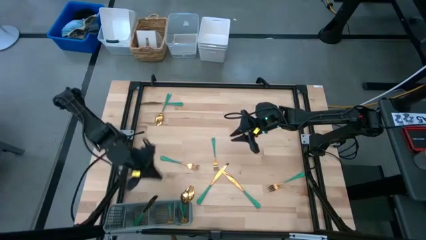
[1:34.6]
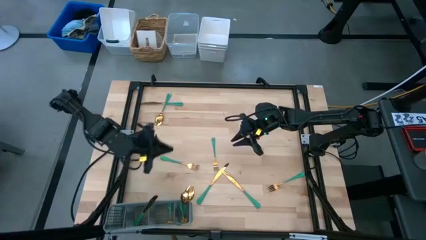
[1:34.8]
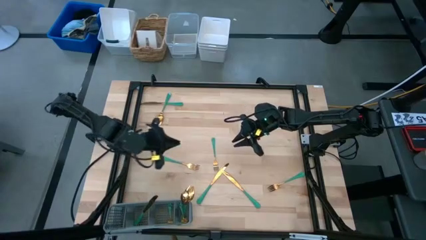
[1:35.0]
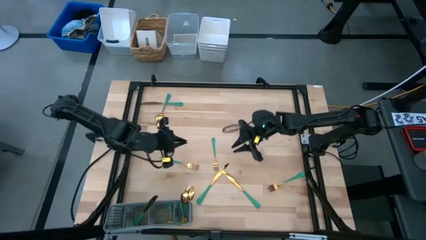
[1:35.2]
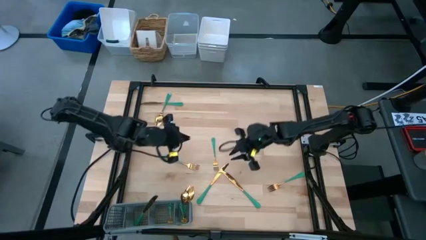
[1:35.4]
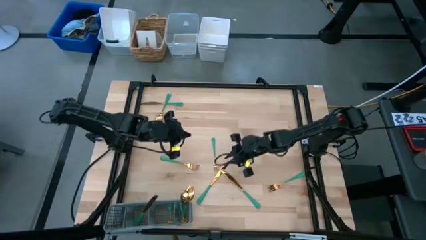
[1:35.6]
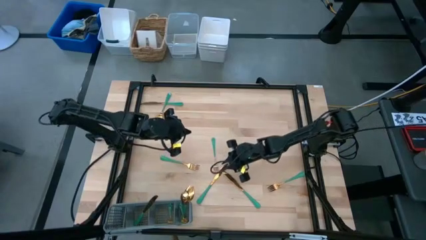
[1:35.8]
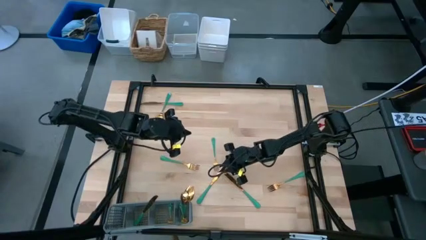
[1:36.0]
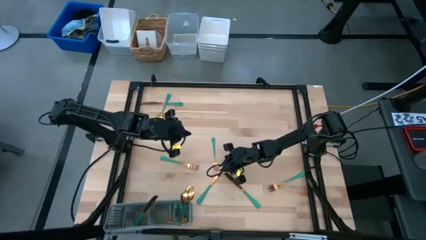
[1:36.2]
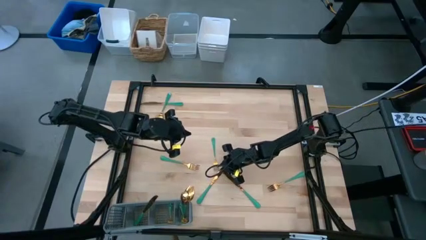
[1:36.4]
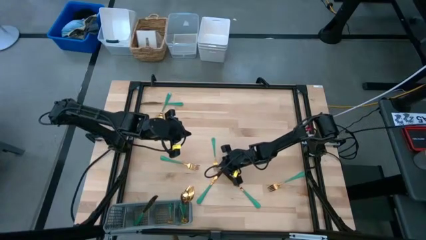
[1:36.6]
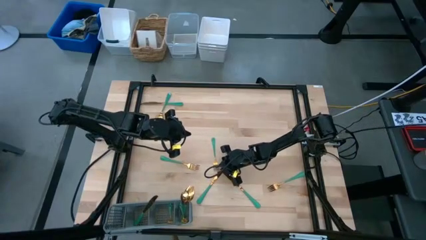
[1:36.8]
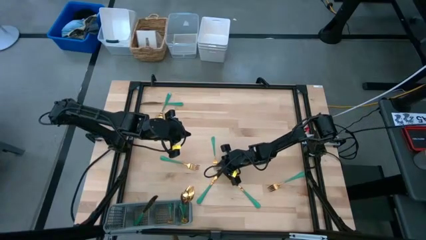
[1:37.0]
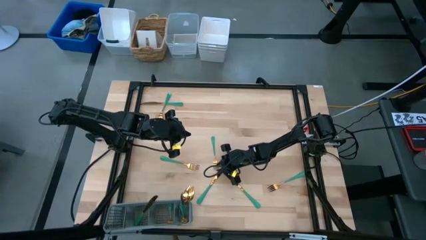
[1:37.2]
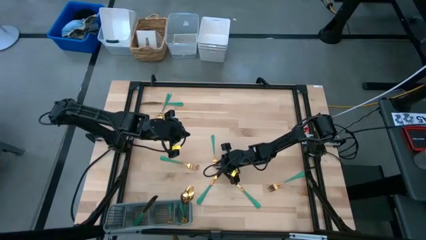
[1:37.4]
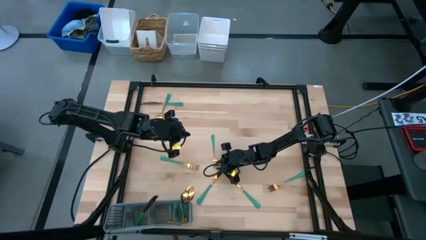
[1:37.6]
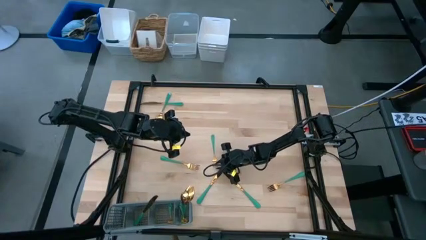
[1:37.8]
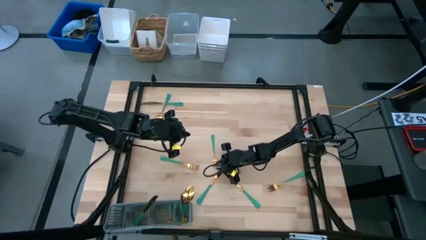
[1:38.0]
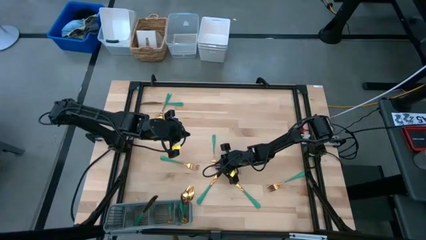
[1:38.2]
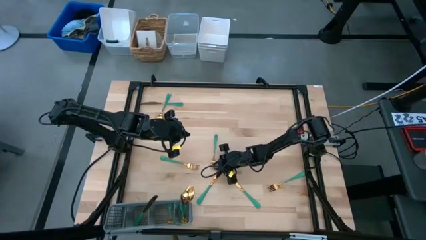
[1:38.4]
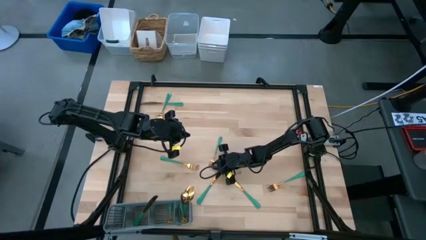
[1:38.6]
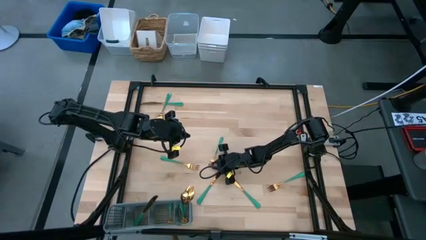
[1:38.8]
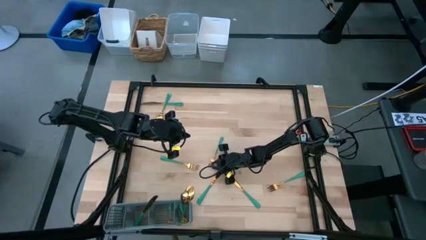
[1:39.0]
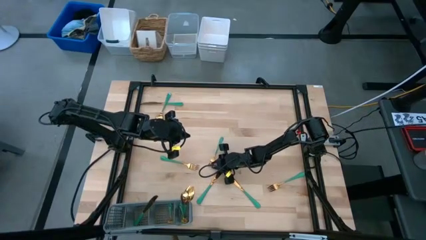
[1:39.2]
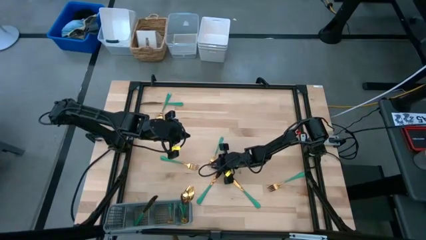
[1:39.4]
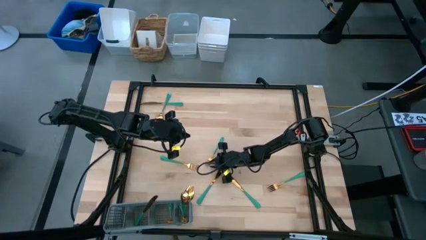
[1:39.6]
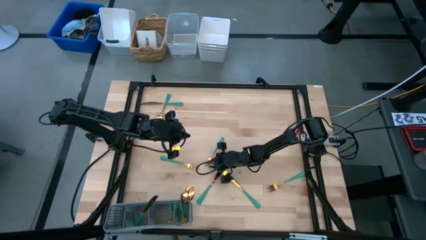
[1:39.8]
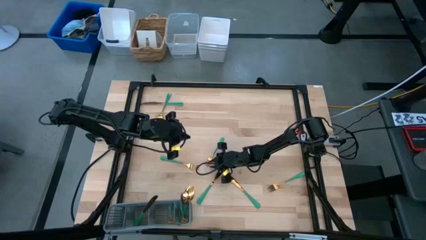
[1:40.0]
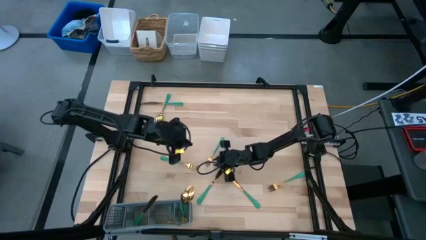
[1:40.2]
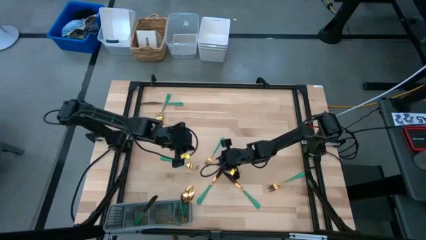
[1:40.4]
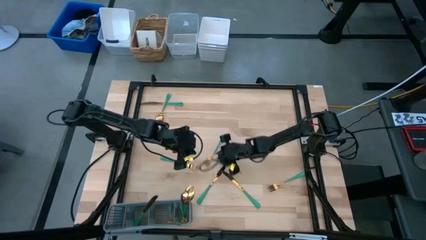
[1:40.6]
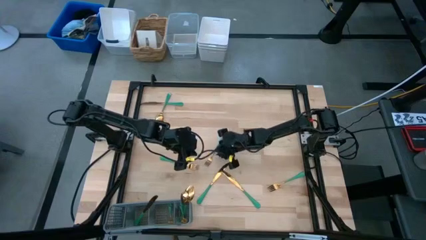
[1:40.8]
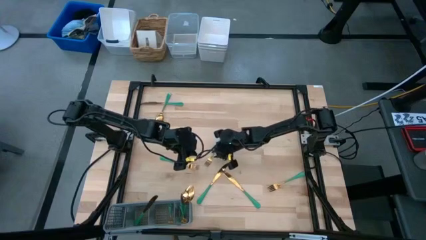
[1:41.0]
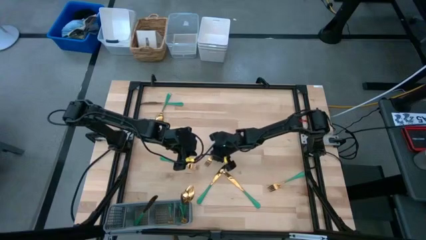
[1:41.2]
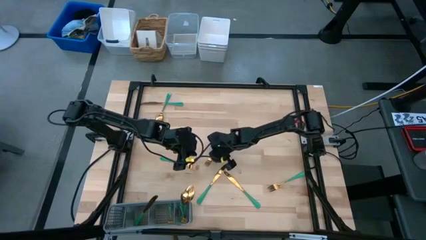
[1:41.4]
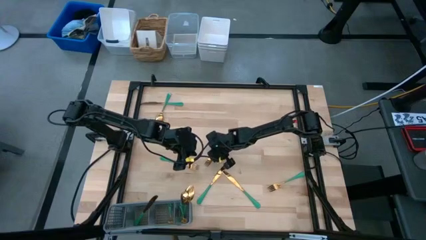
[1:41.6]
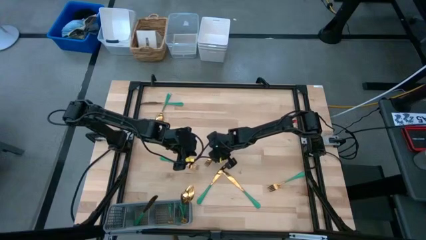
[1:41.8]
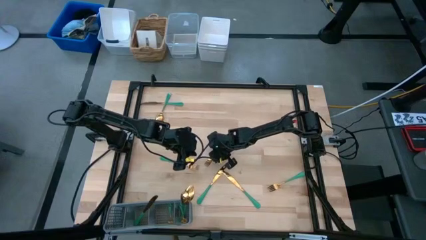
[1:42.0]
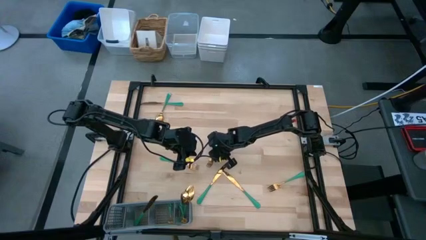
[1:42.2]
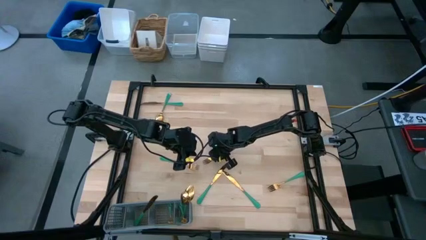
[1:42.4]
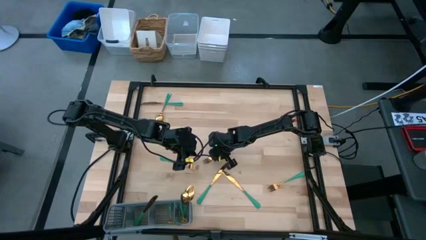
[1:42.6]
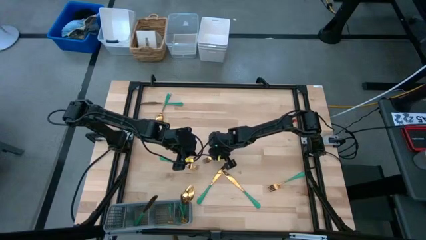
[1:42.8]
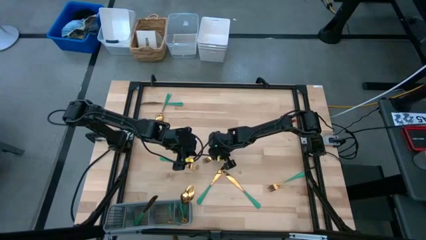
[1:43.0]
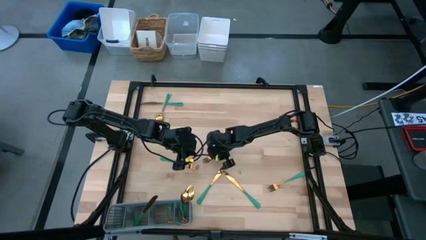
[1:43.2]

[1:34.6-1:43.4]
Task: Sort silverware
Put the middle fork into the cutlery rack
